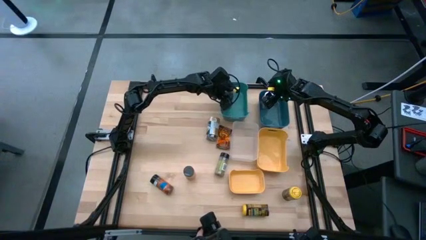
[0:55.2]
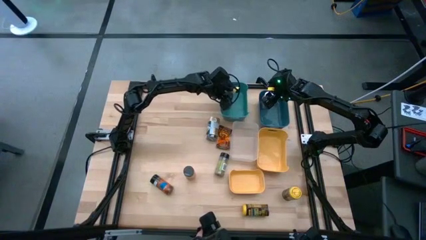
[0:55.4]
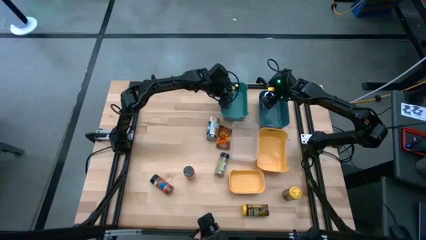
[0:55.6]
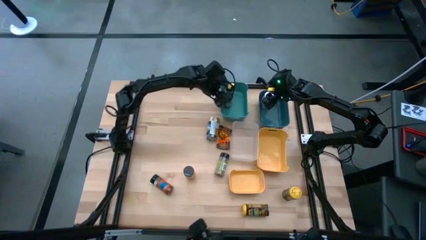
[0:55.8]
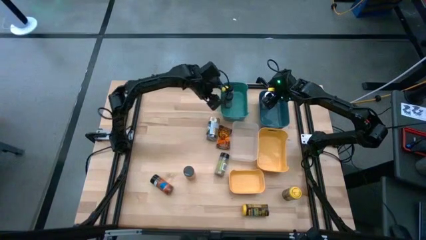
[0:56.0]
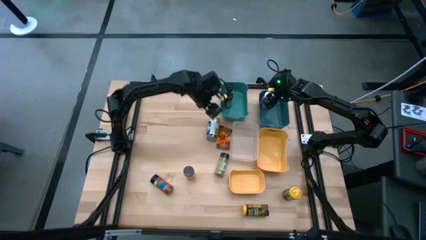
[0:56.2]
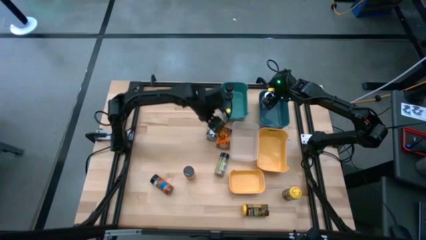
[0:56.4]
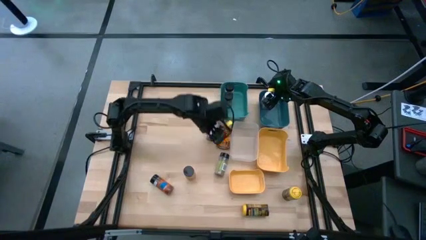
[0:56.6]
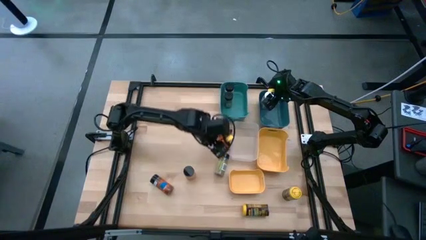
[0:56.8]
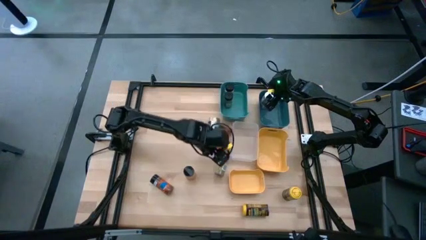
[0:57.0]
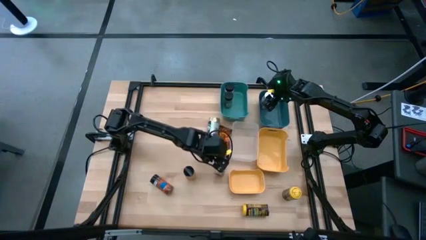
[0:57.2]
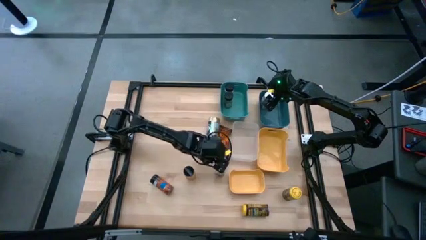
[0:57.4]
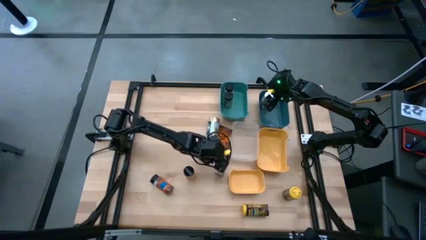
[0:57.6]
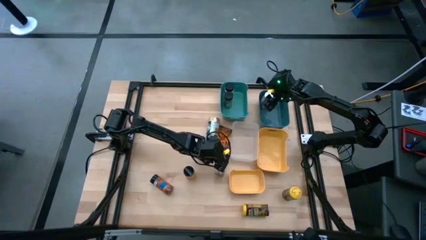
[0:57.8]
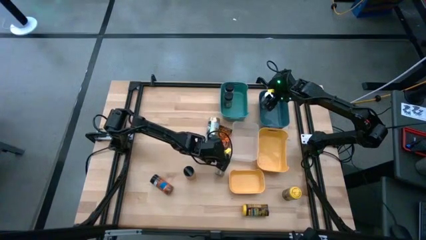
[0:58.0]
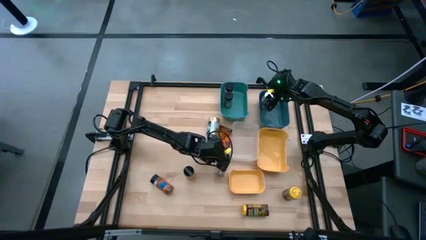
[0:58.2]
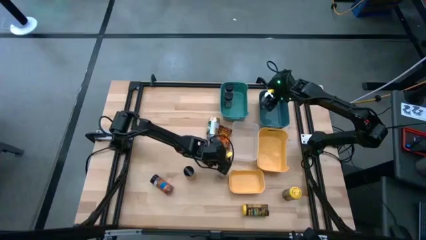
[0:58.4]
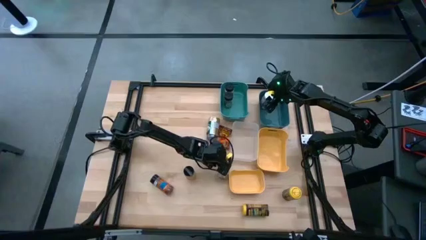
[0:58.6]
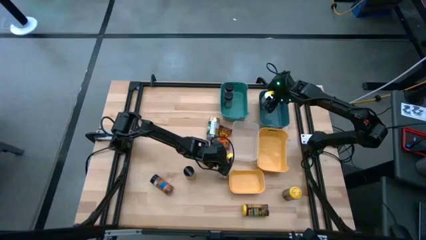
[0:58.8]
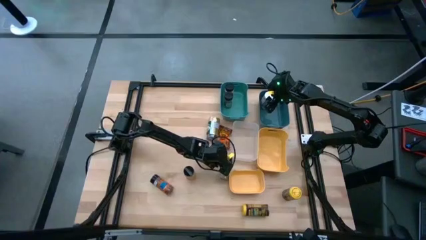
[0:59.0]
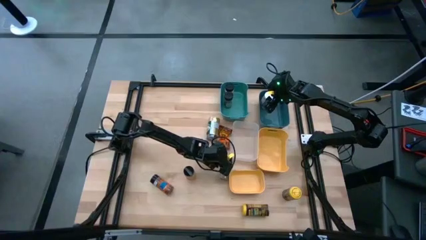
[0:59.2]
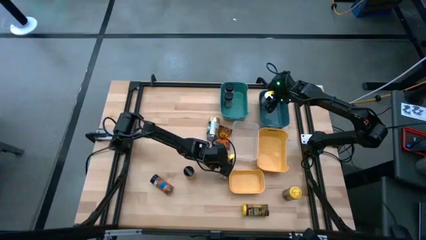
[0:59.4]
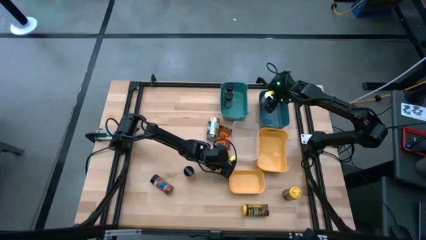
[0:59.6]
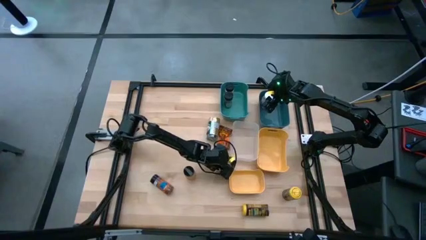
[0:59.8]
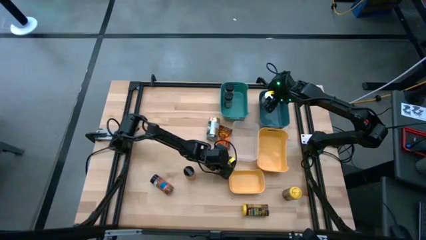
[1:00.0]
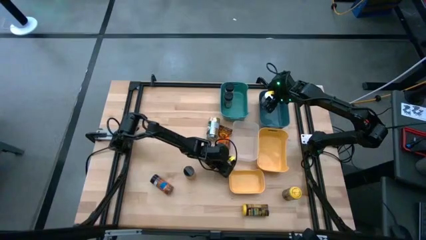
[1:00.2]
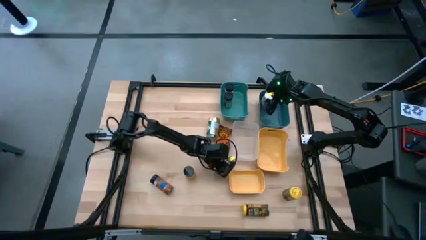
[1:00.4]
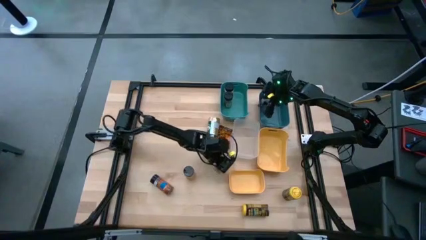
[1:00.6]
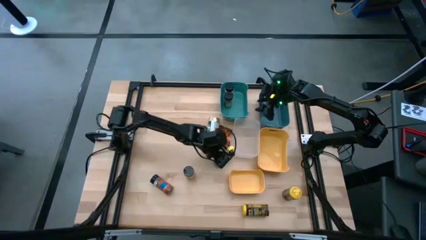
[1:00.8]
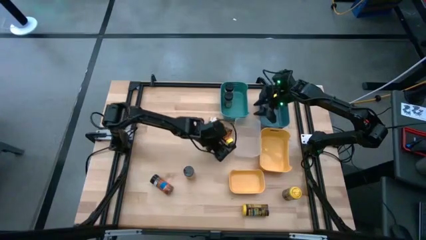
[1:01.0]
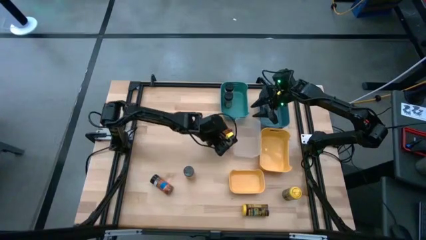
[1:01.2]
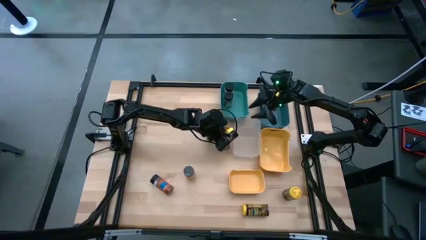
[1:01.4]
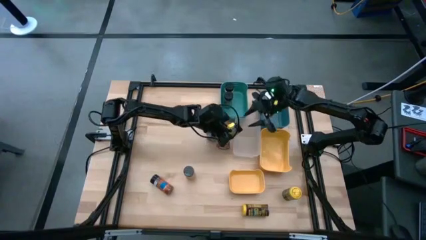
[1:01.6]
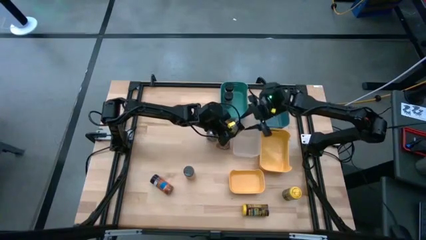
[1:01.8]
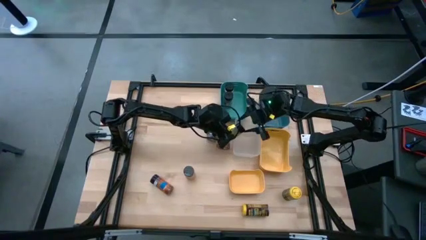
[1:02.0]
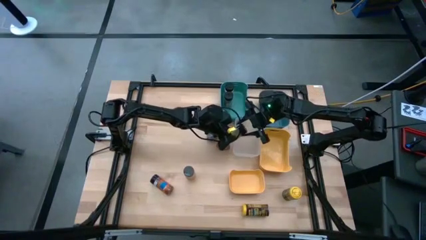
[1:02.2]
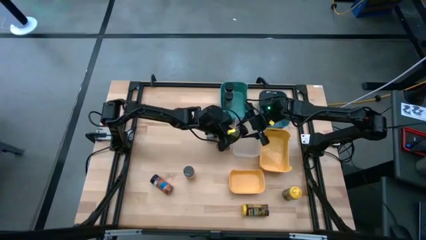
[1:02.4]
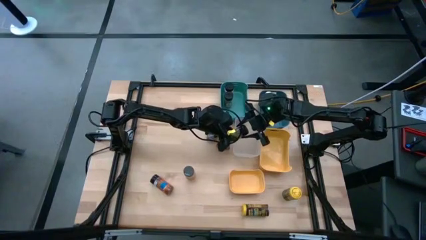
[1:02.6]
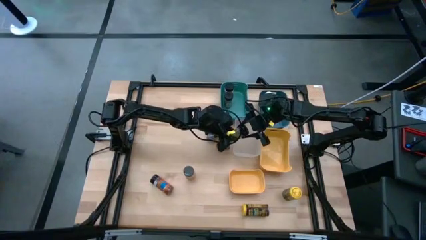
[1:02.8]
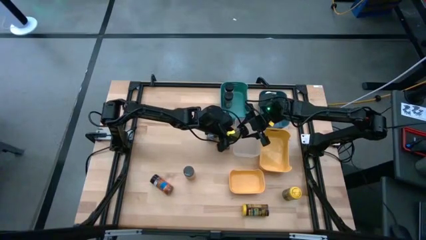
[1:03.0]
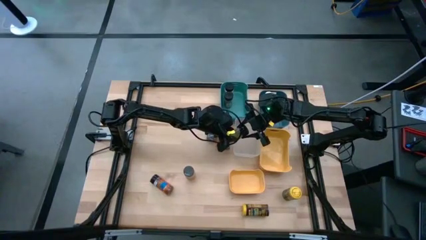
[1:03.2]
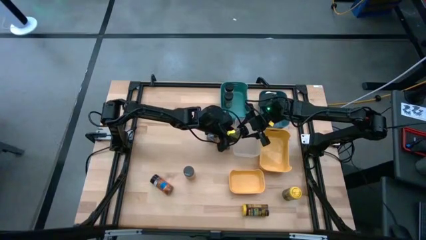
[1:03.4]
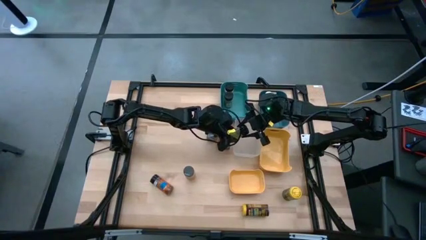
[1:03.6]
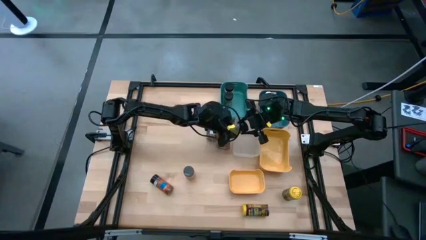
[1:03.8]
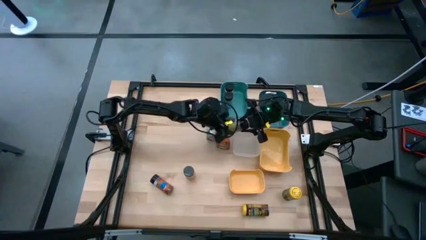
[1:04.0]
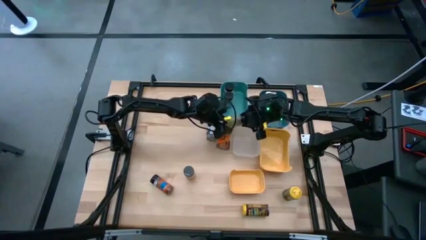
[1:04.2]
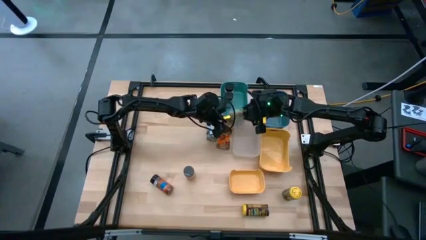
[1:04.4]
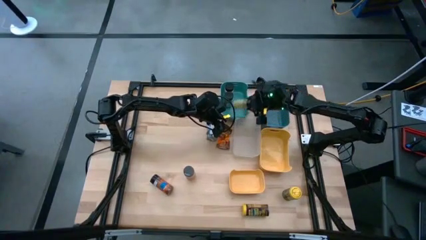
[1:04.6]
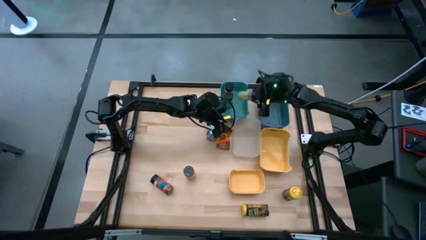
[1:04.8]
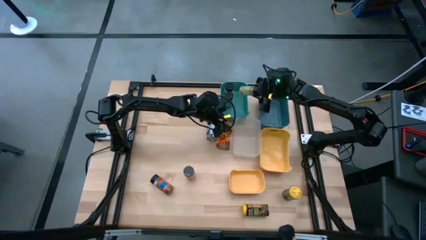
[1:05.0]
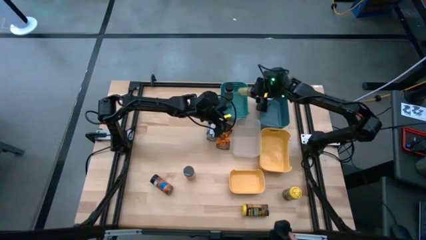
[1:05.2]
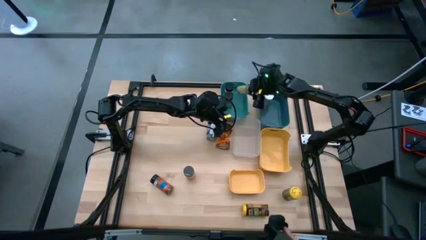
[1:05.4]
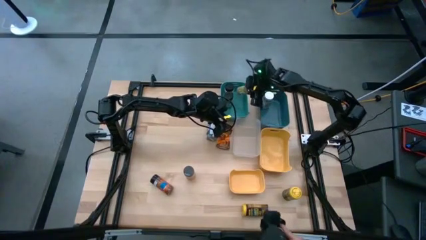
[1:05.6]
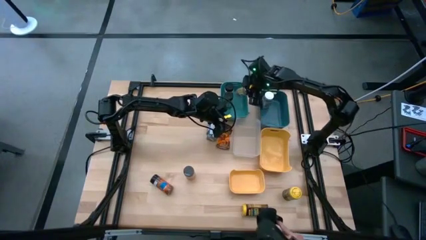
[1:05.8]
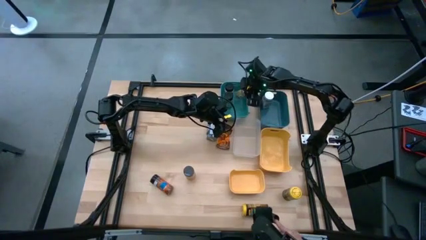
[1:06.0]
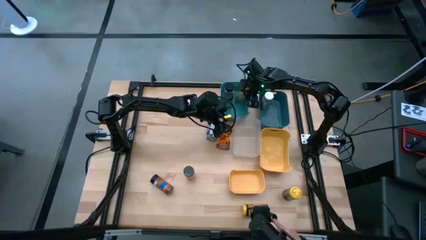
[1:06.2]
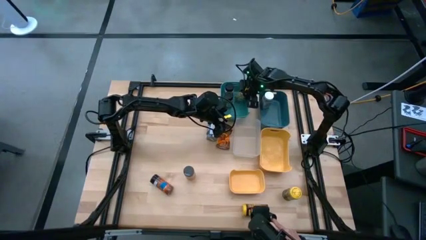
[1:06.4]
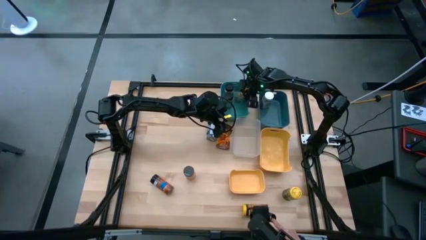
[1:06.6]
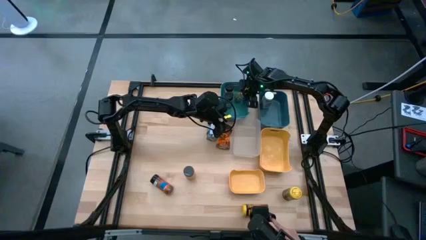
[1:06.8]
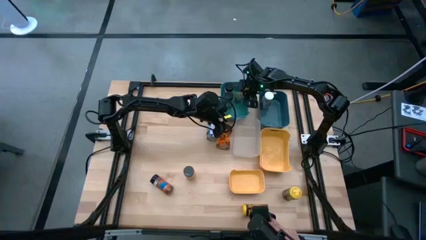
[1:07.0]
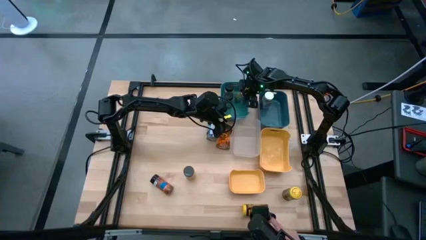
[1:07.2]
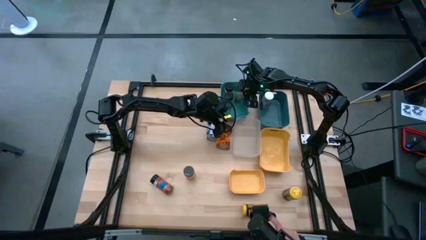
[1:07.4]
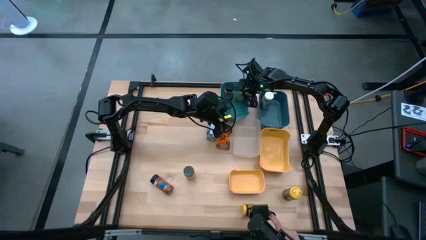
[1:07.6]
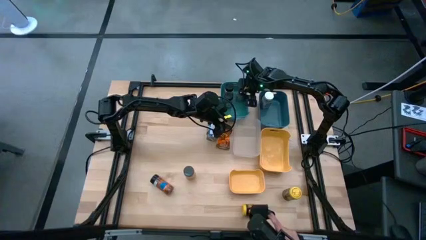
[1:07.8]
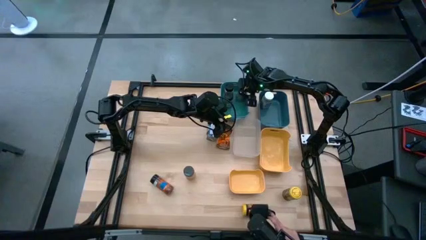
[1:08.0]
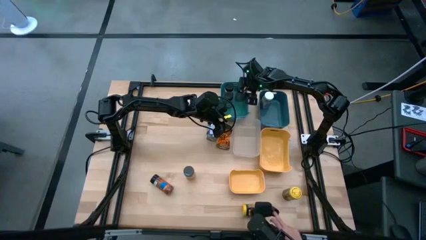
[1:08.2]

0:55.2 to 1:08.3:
Task: Sort spices by type
Put the green seasoning into the green bin

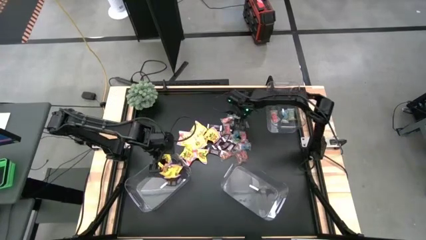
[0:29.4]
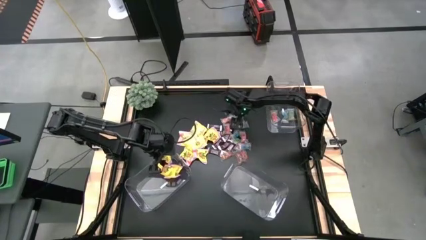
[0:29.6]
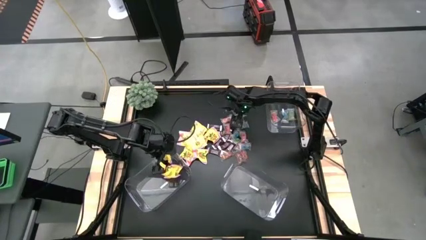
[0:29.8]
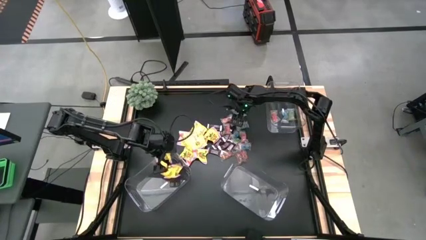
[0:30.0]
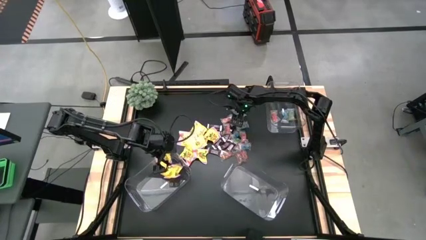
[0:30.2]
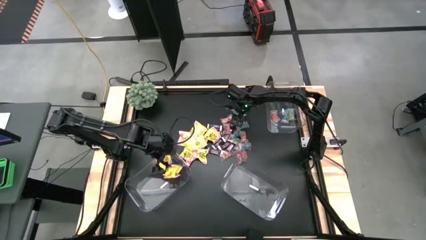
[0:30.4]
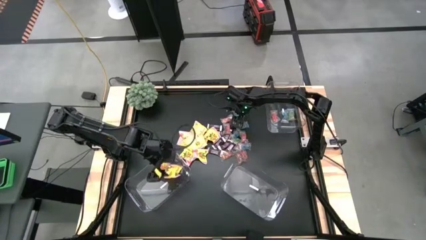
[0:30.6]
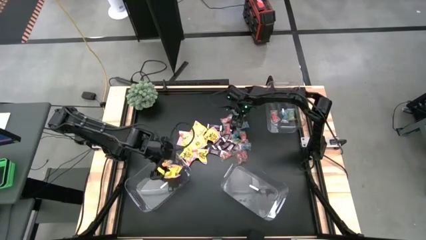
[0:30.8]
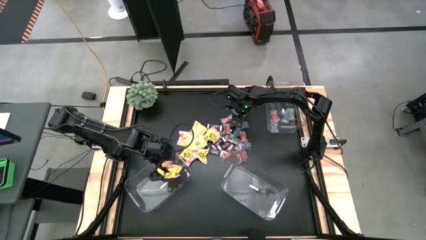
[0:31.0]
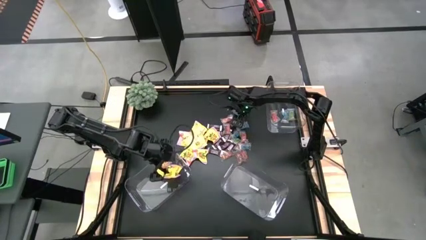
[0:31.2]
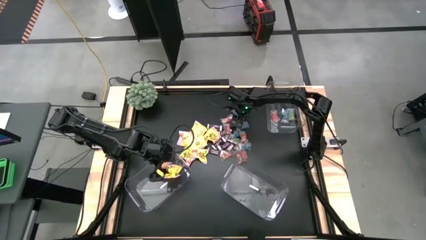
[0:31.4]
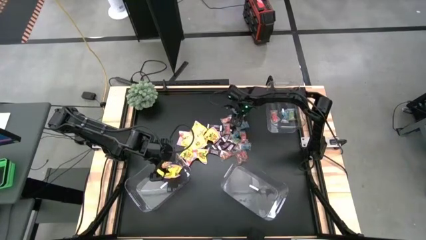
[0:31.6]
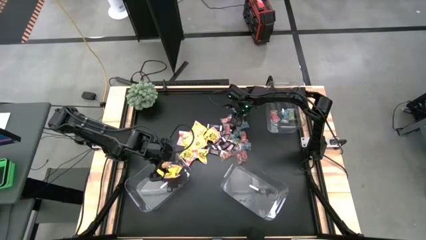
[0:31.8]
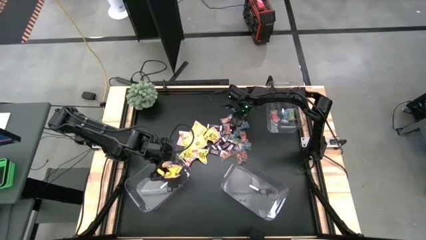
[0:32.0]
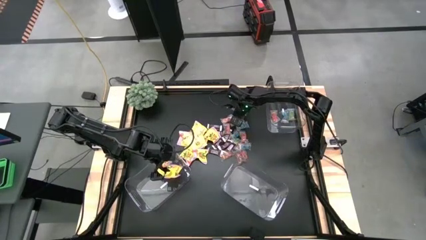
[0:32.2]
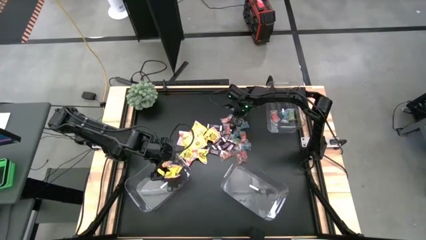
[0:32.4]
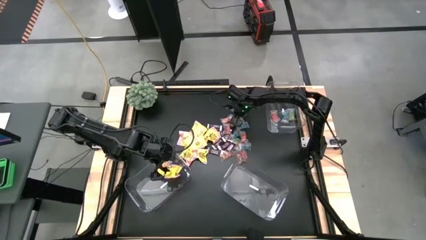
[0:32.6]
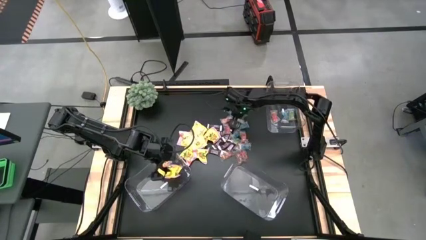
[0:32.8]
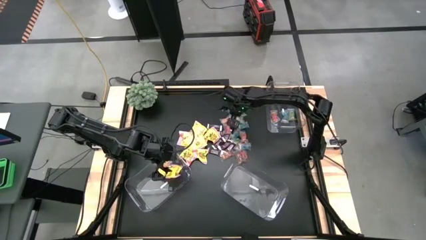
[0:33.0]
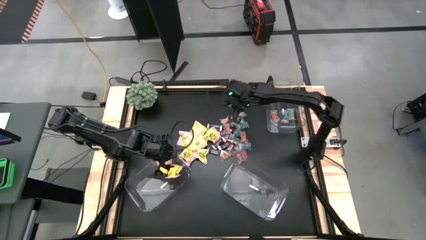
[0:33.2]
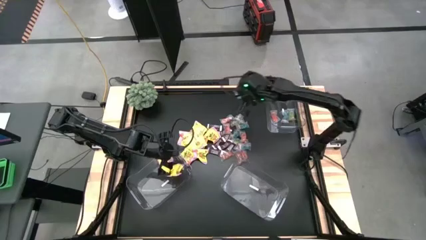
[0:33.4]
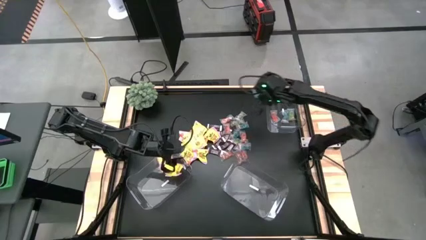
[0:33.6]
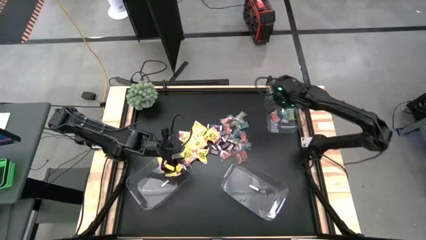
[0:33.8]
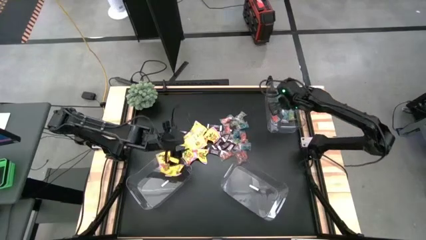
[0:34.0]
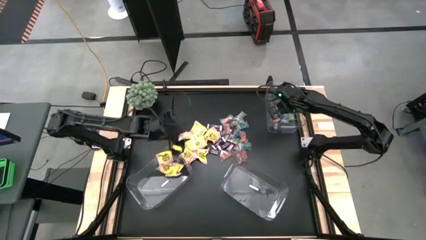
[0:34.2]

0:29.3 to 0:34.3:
Task: Sort candy
Put the blue candy in the top right transparent container
